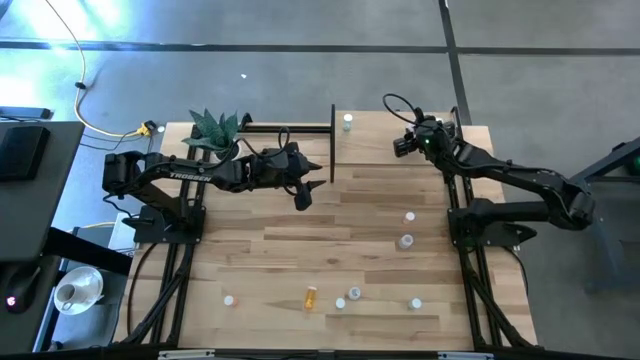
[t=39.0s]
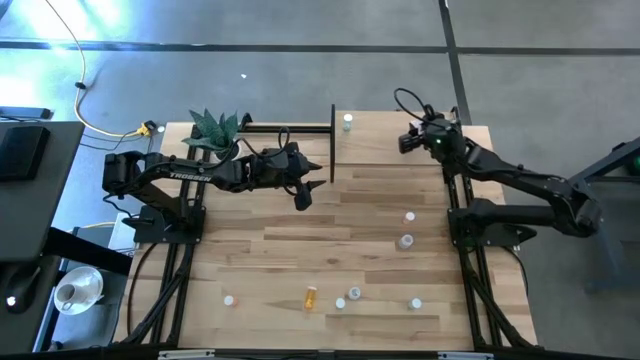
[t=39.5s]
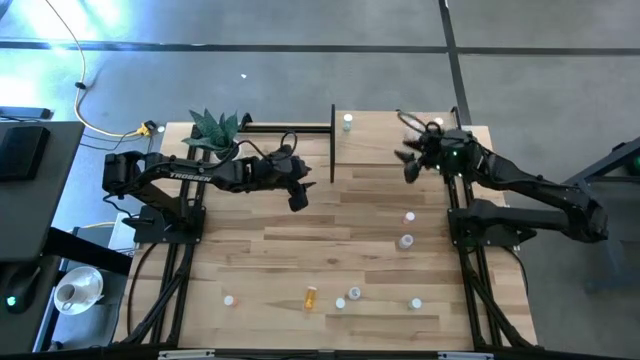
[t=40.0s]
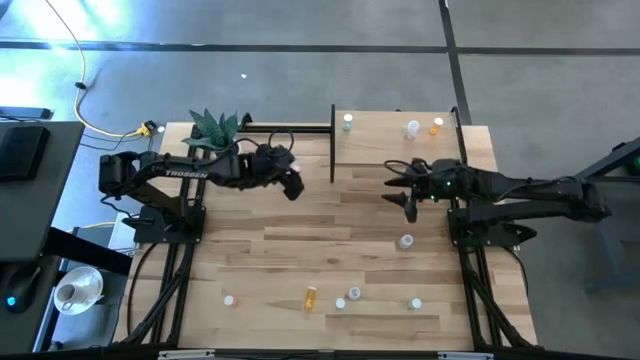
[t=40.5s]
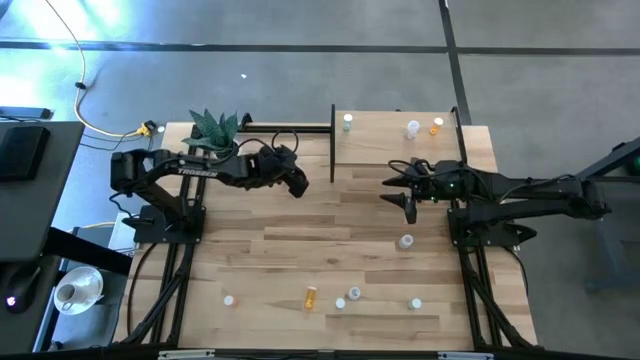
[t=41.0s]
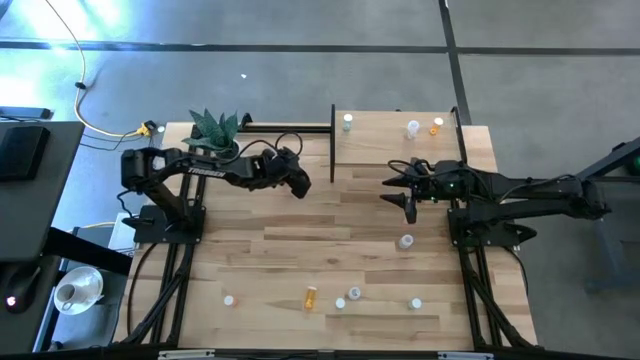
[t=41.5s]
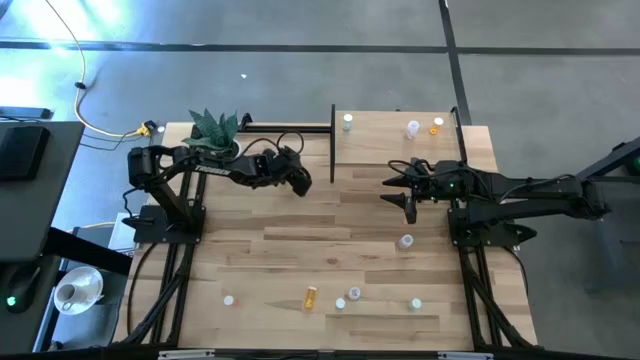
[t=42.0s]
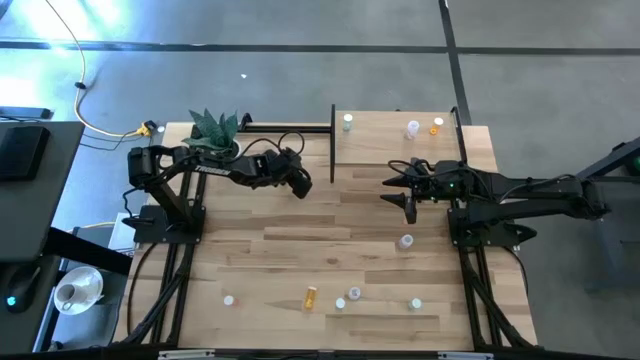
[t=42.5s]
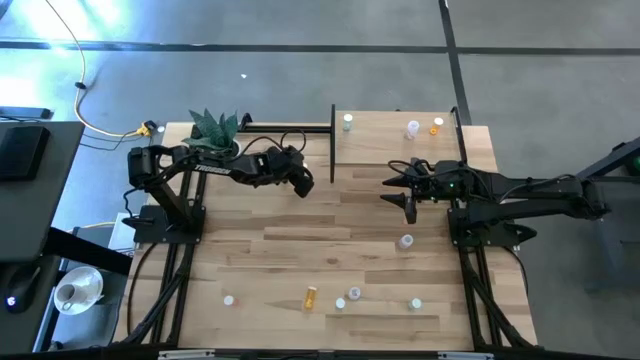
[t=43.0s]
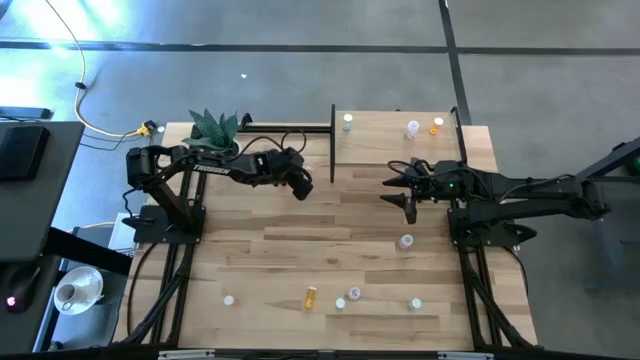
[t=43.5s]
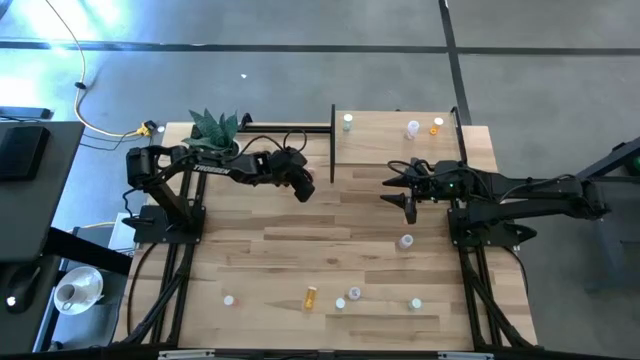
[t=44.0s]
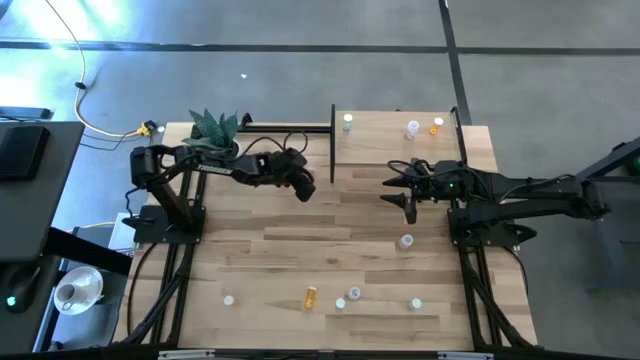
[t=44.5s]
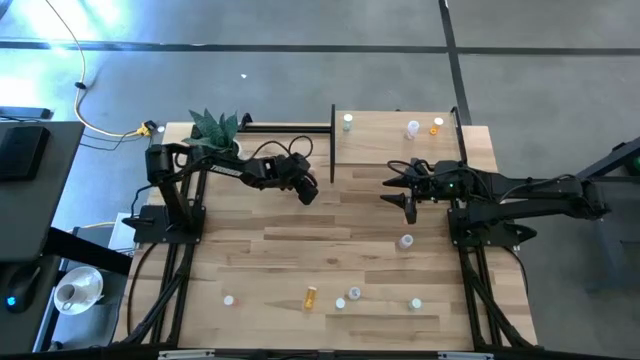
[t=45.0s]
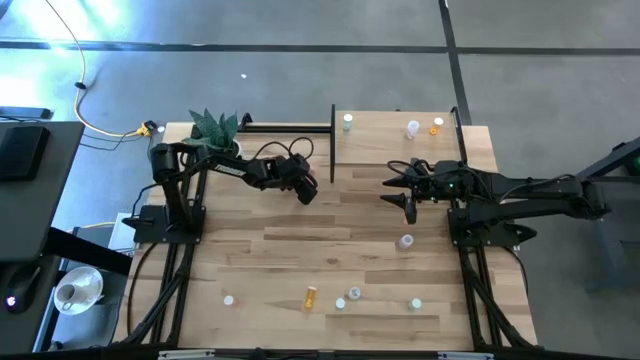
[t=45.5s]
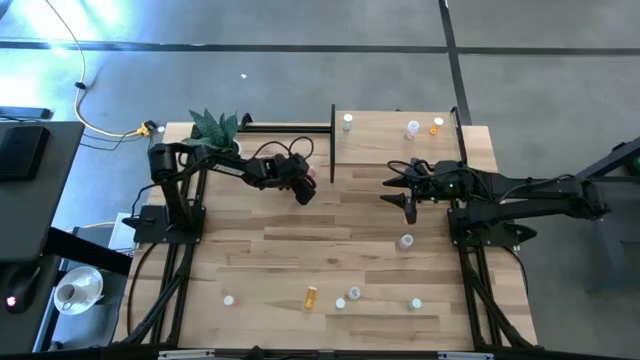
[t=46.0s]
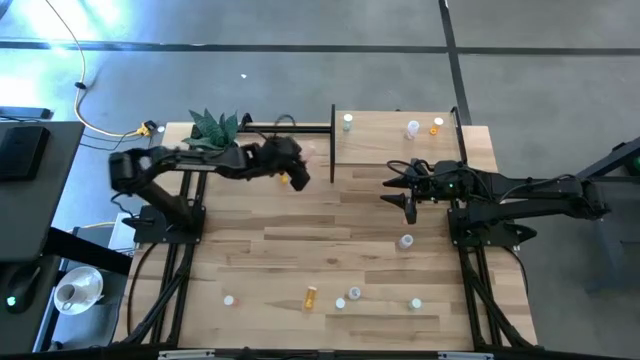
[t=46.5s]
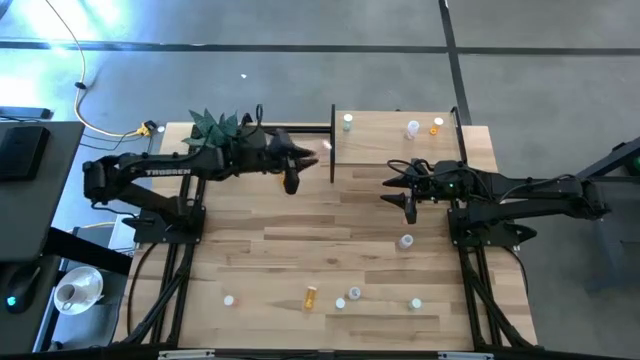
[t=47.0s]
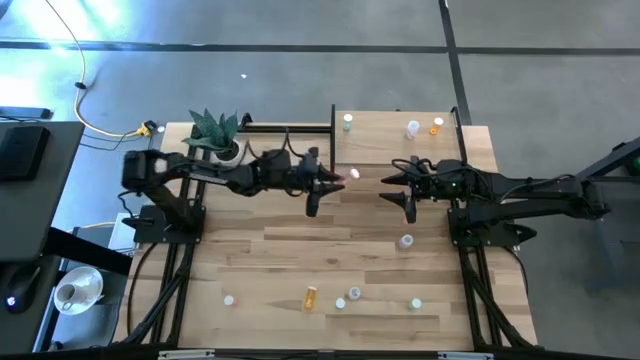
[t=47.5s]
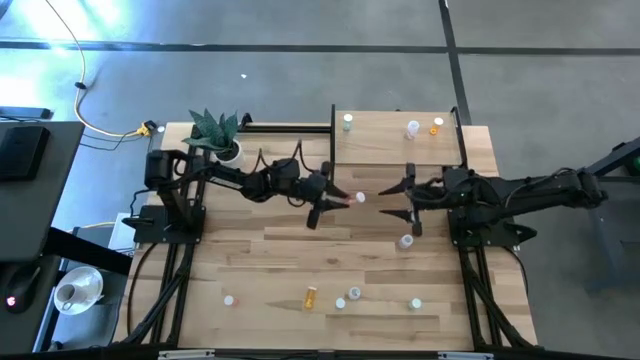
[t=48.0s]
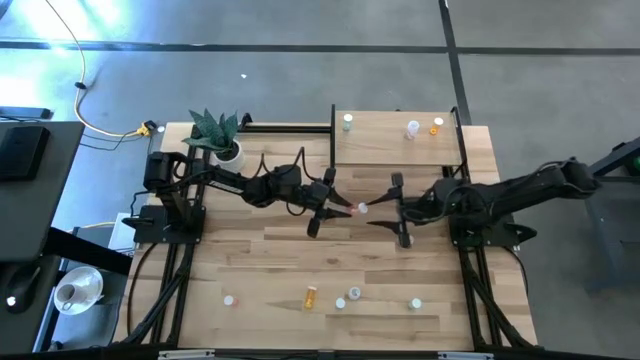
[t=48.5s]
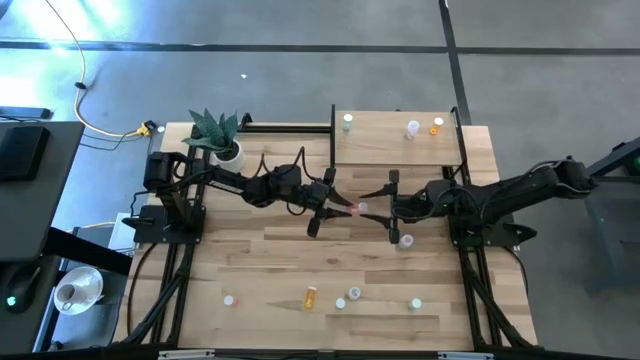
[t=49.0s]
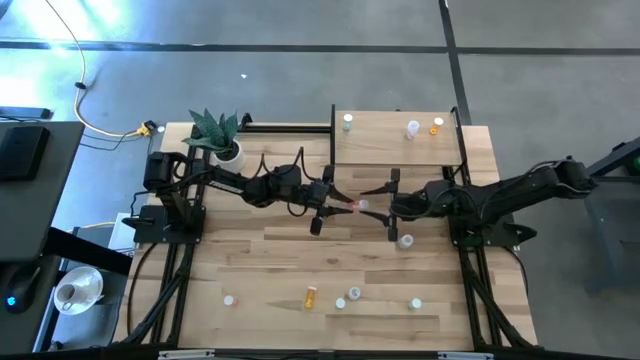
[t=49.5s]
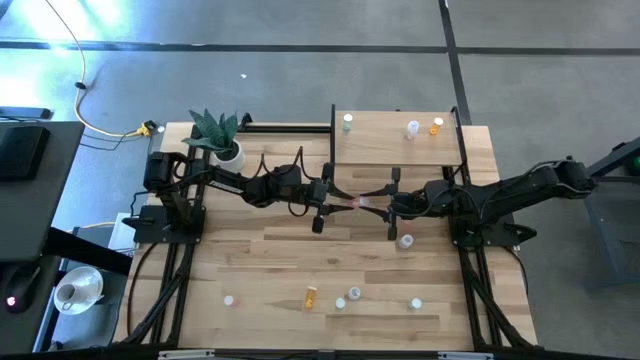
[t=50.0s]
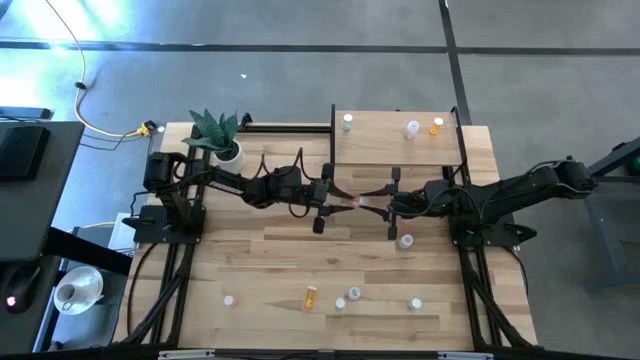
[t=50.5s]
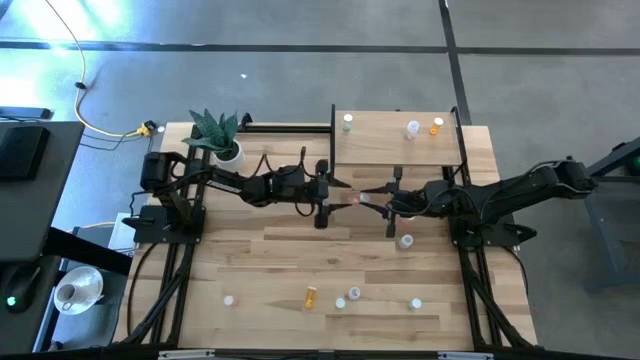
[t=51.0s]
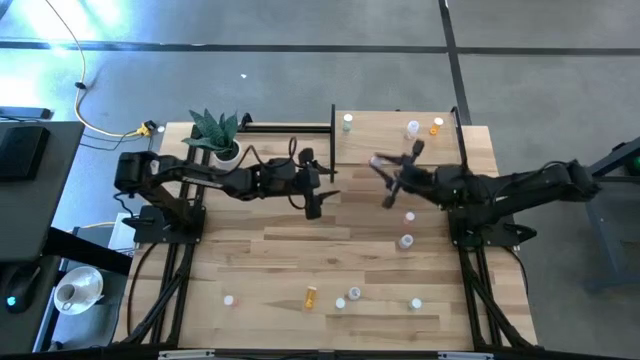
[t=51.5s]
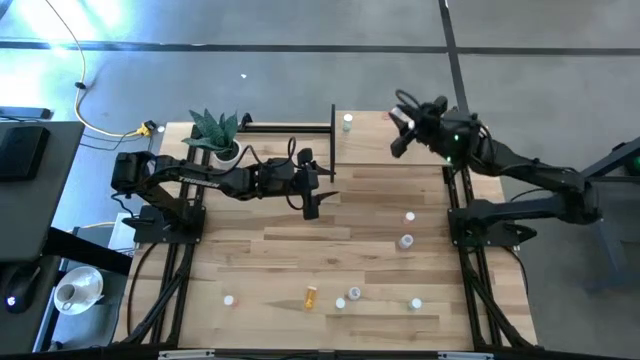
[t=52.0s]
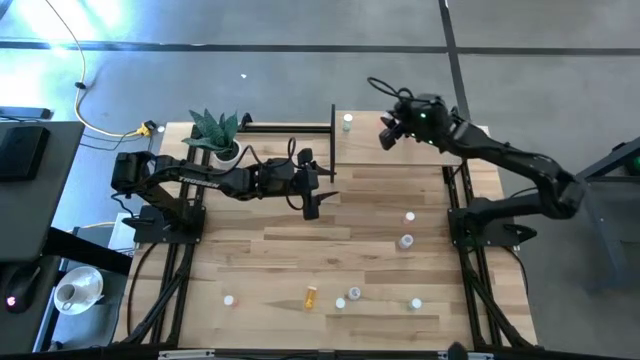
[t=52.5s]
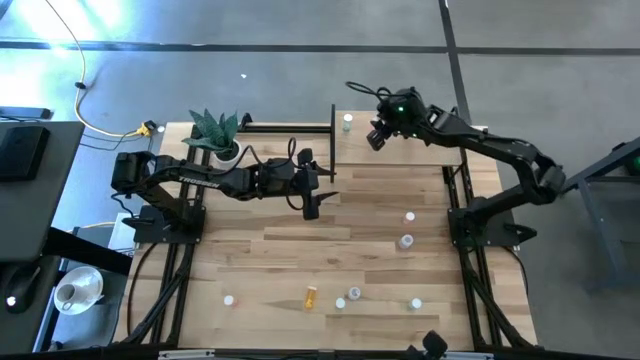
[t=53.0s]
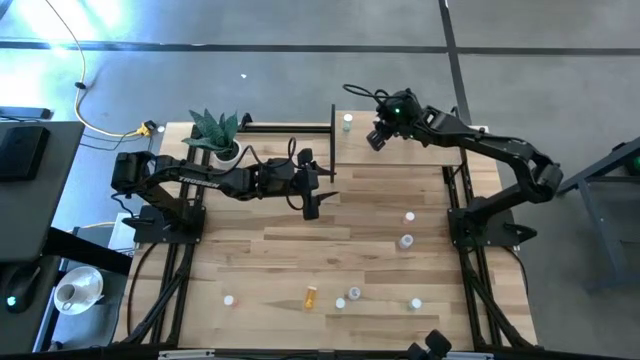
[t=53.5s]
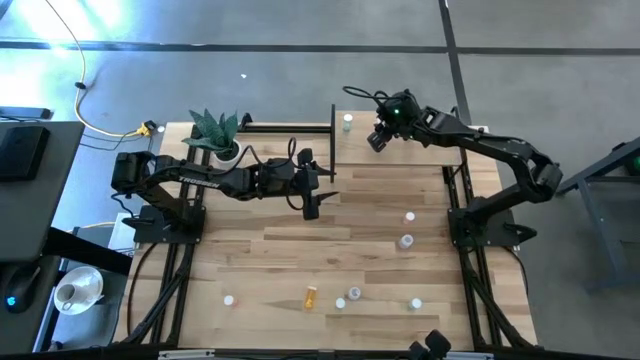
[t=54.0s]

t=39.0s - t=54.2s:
Task: Pick and place medicine bottles onto shelf by color
Put the top left pink pill bottle on the shelf

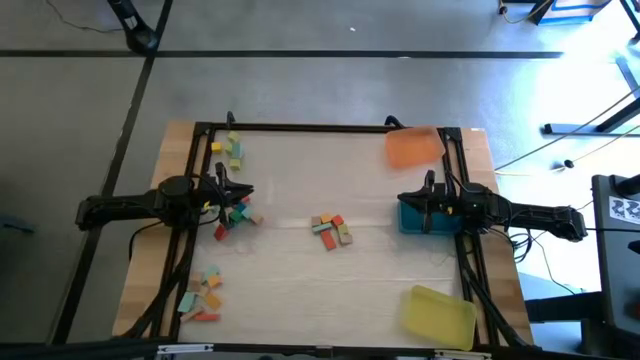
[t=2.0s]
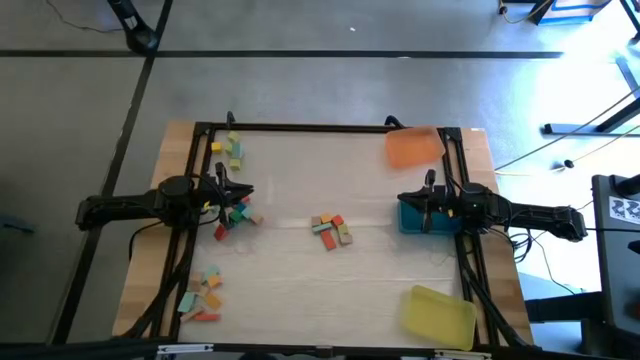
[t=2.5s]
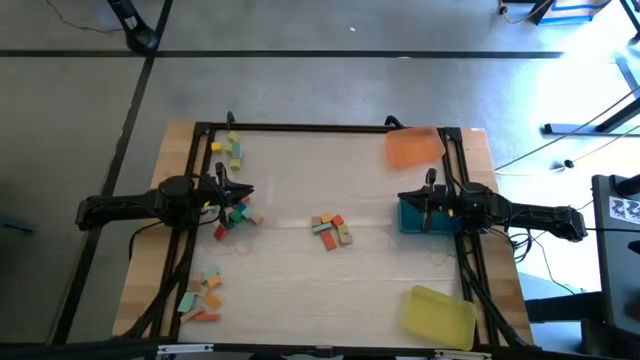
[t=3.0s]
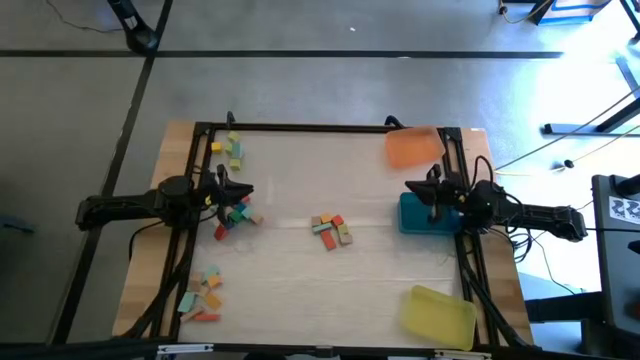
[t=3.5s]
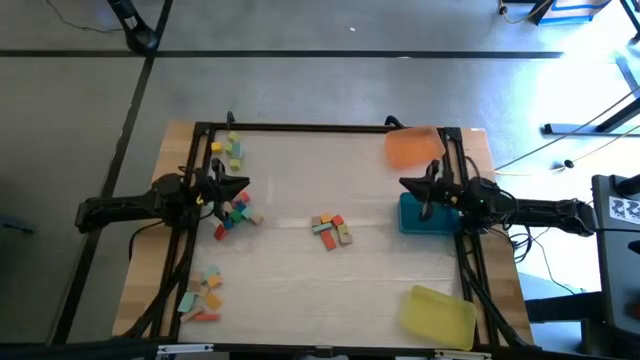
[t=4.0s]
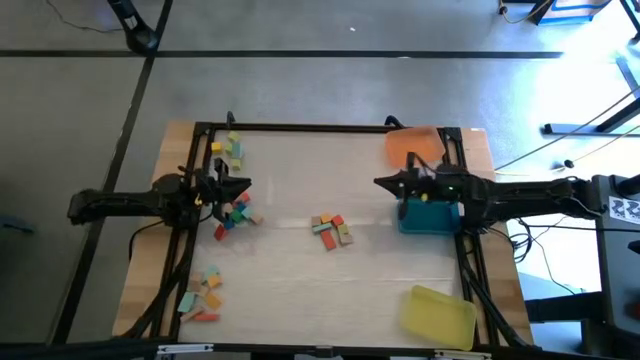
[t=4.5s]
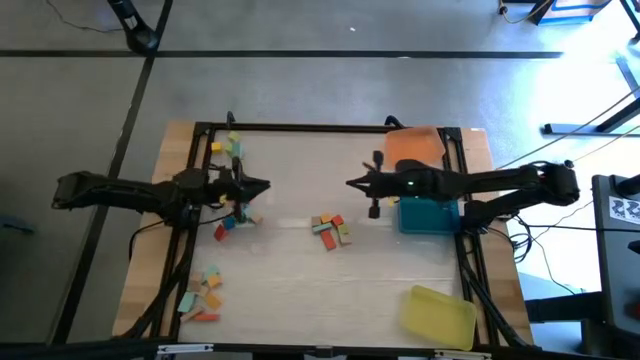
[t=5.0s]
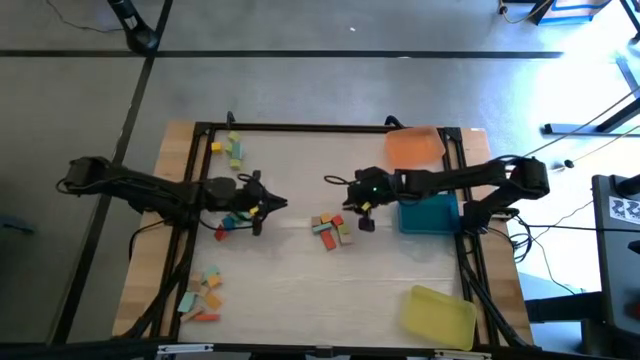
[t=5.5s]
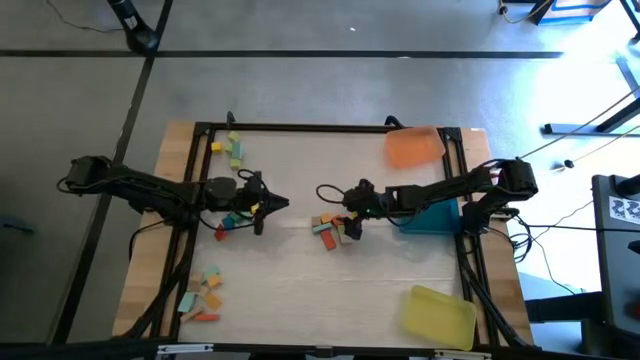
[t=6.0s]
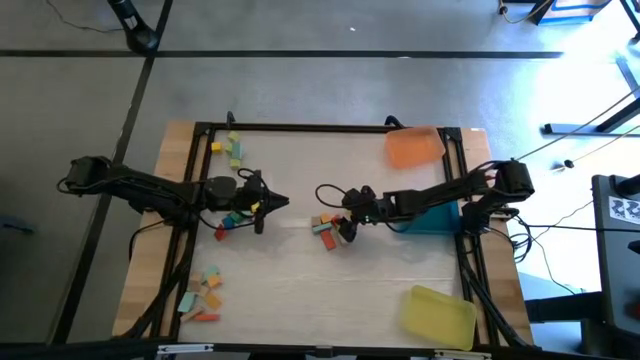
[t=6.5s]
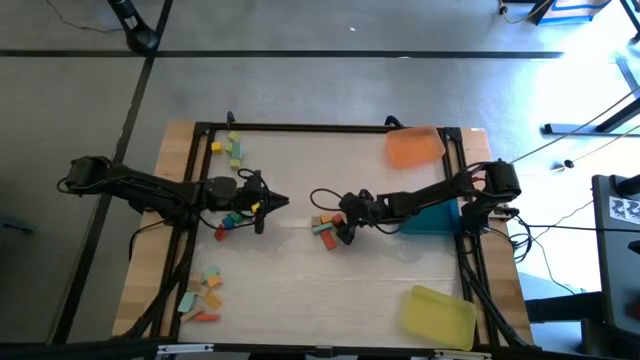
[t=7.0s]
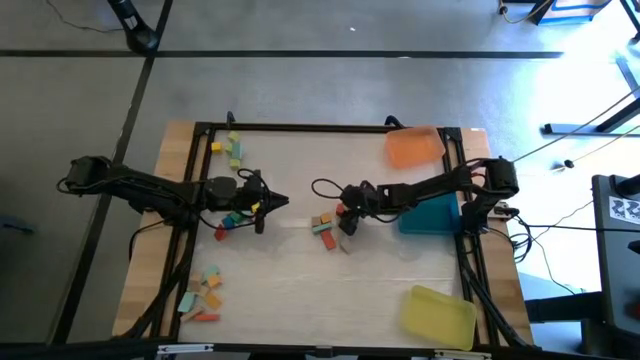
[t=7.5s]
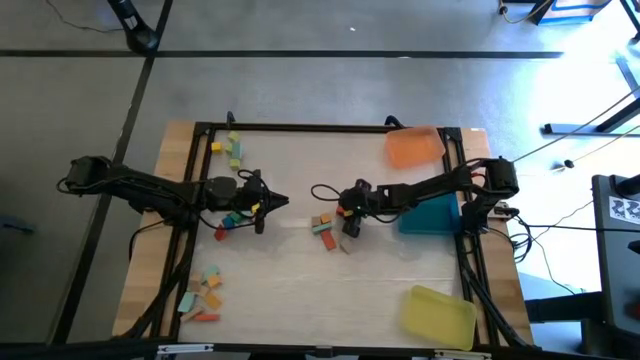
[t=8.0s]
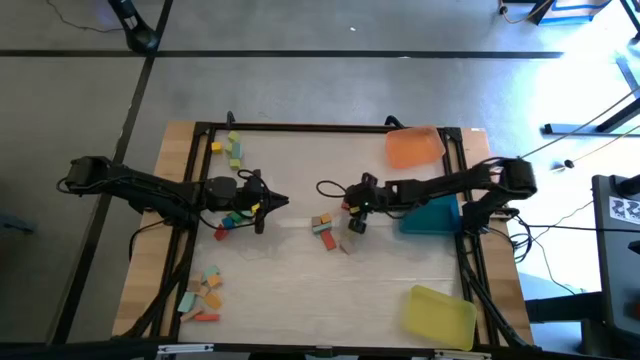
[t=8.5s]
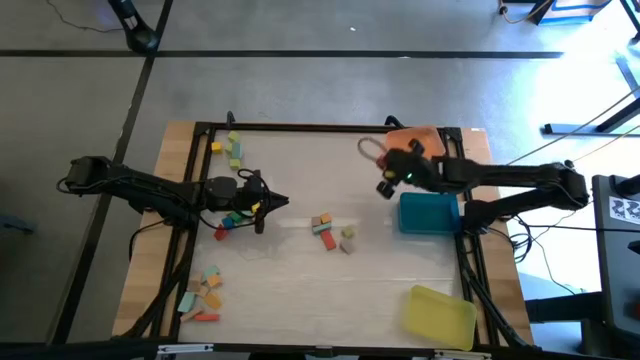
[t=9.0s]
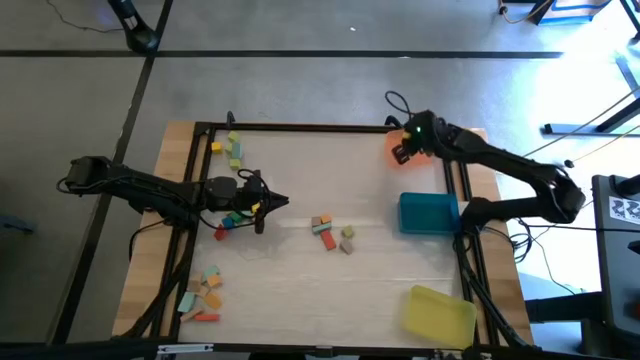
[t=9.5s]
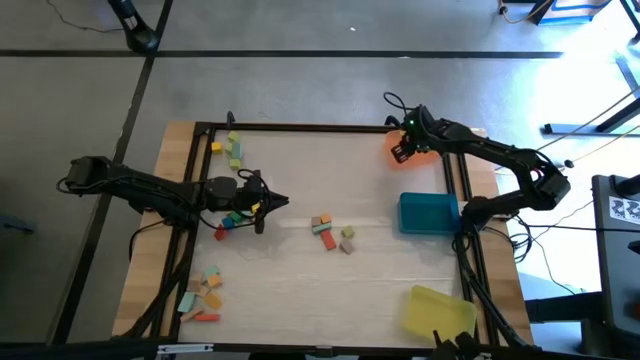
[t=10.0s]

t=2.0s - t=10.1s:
Task: Sort blocks by size
Put the orange cube block into the orange bin
